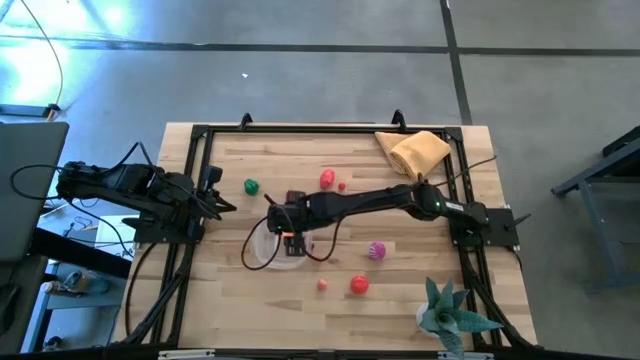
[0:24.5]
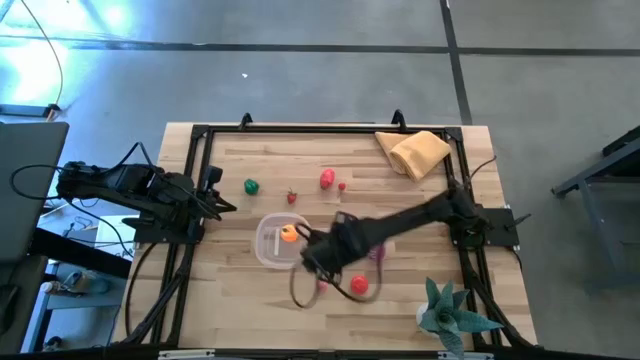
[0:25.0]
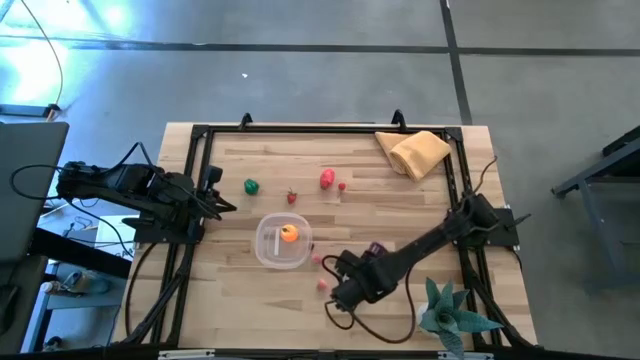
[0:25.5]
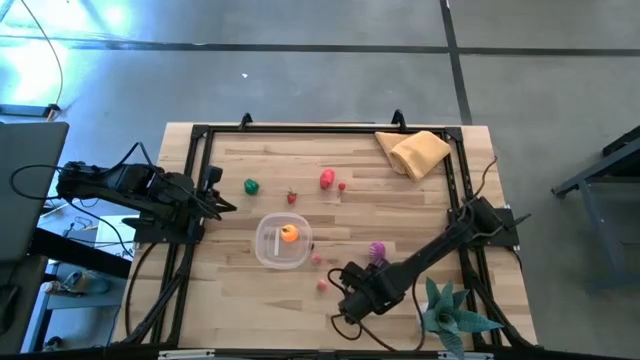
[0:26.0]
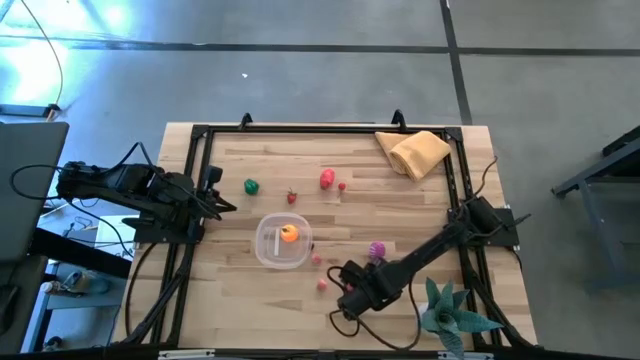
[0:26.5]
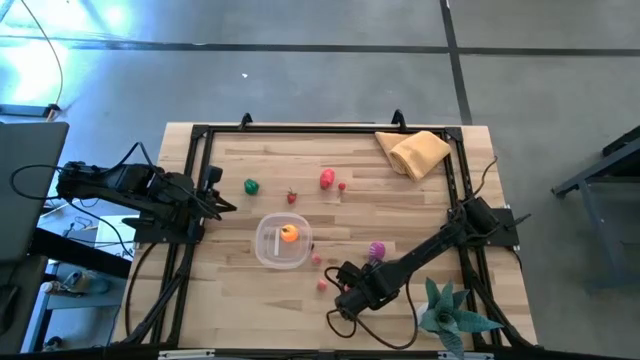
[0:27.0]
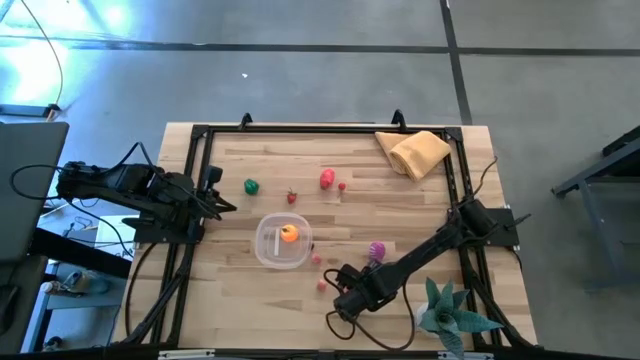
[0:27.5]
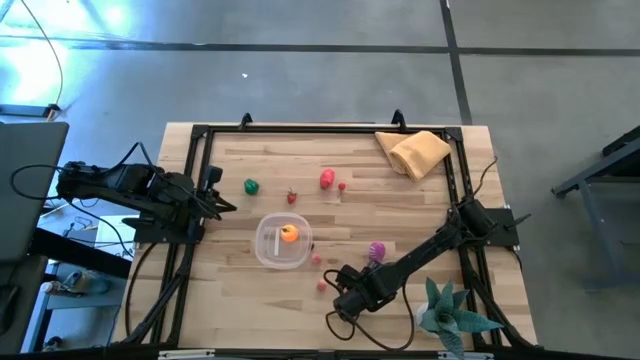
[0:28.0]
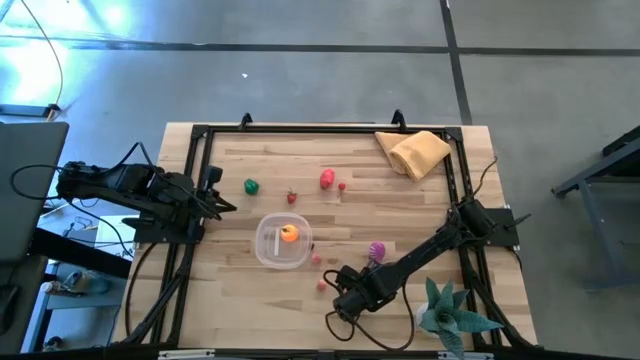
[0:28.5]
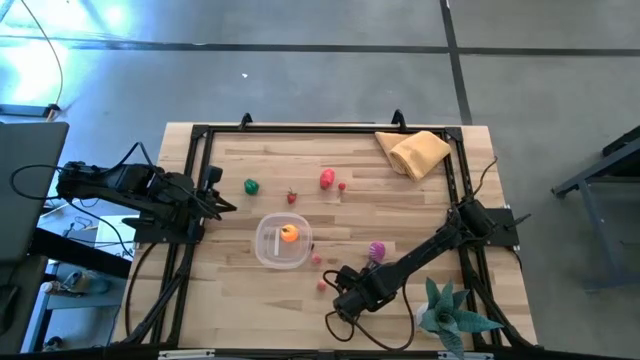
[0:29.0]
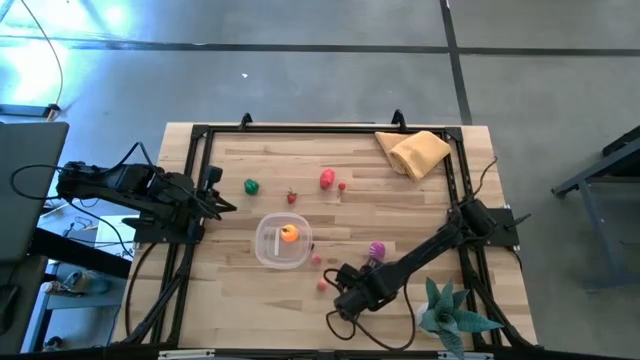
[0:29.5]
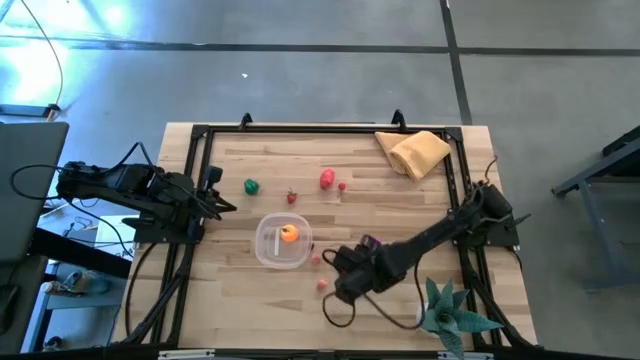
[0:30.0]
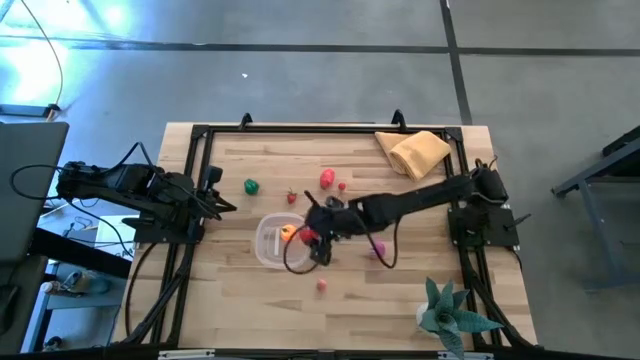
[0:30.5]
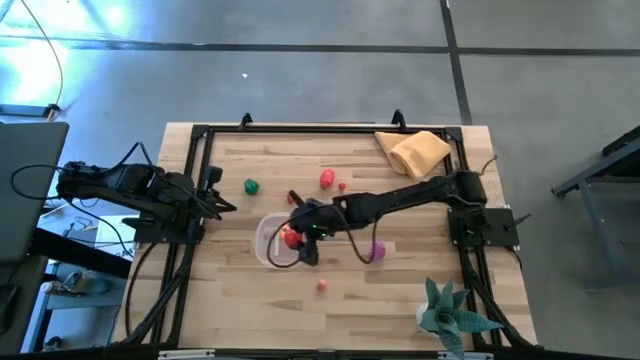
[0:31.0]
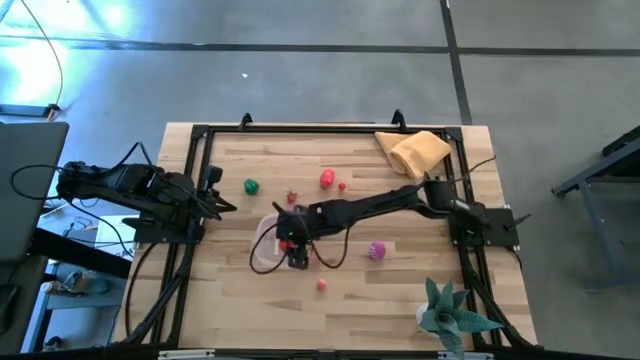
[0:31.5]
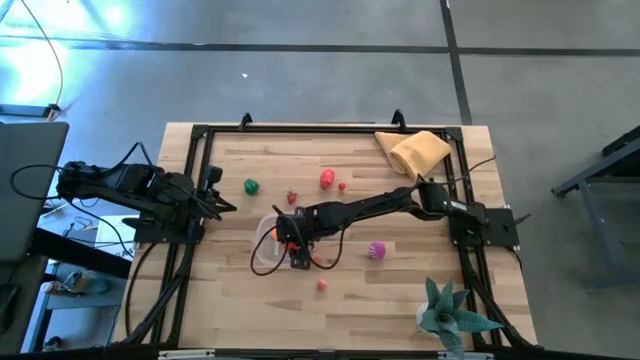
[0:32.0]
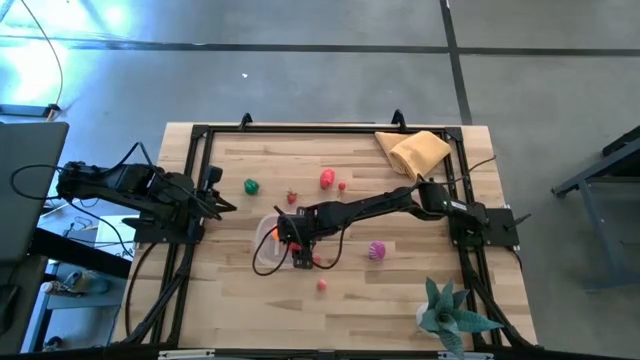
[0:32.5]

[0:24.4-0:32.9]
Task: Pick and placing Produce into tupperware
Put the tomato into the transparent container

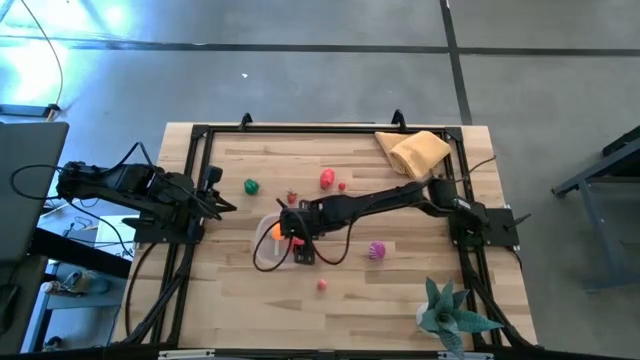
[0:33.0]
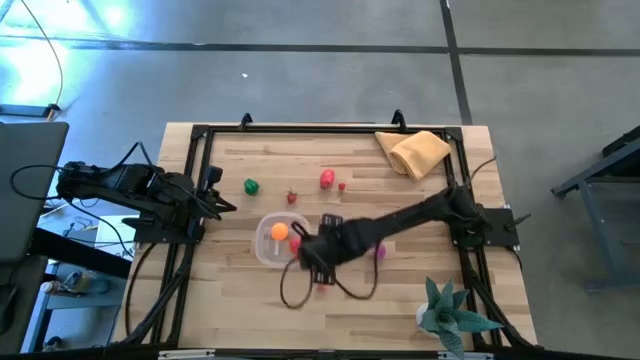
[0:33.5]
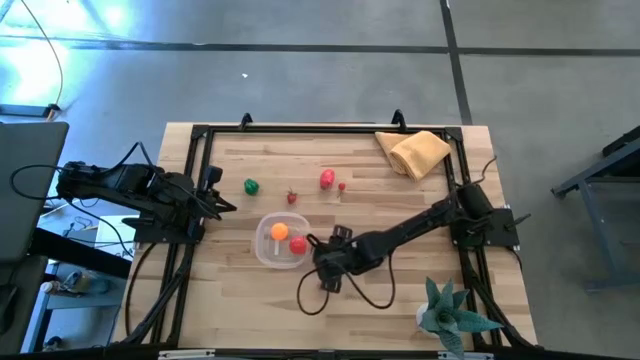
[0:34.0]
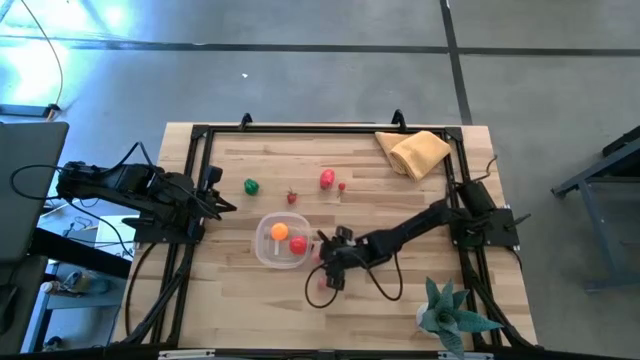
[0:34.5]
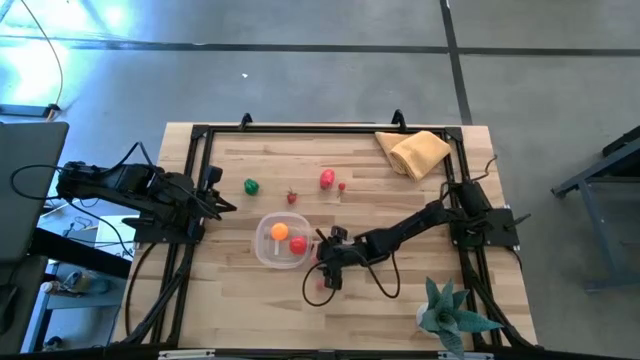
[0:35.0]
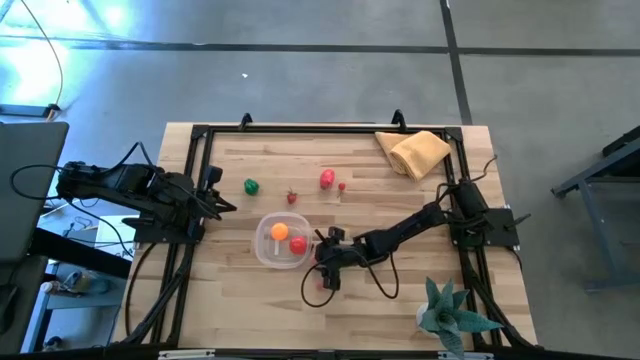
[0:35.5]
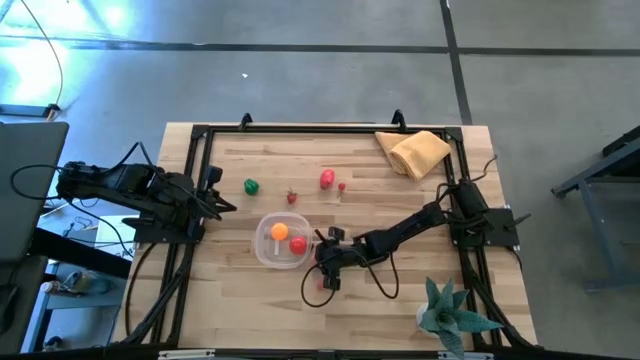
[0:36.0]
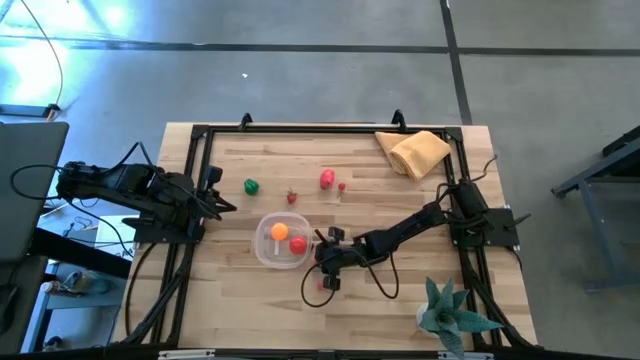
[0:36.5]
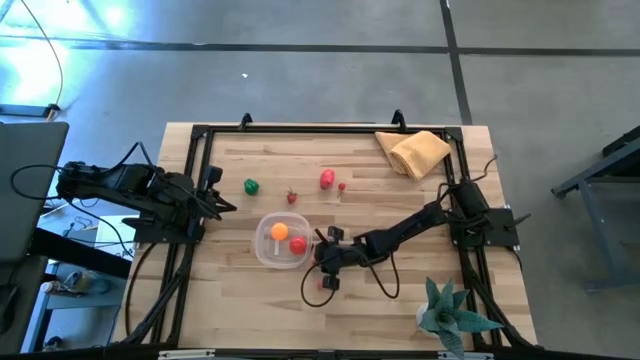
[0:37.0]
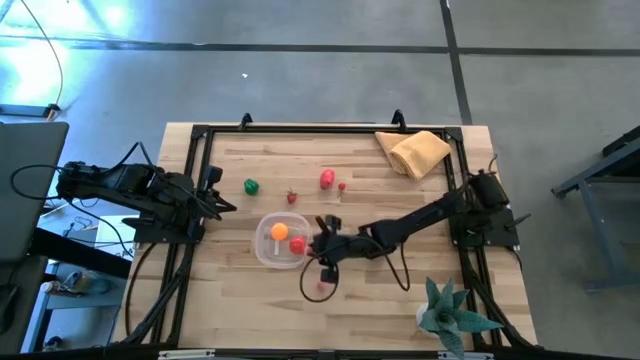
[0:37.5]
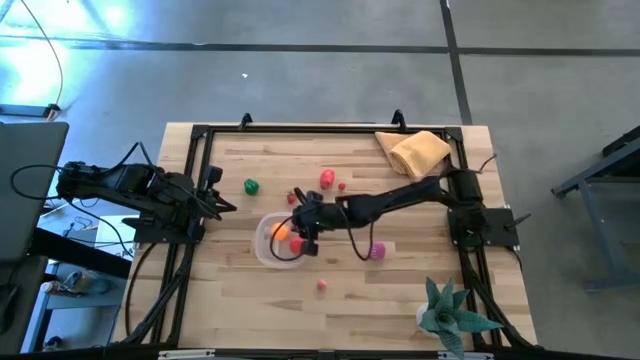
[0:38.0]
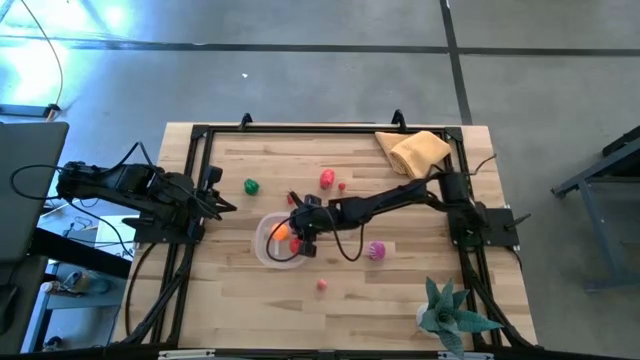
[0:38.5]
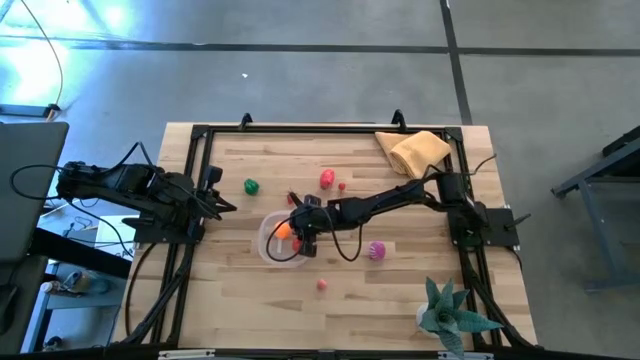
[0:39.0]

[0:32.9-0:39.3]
Put the top pink peach into the transparent container

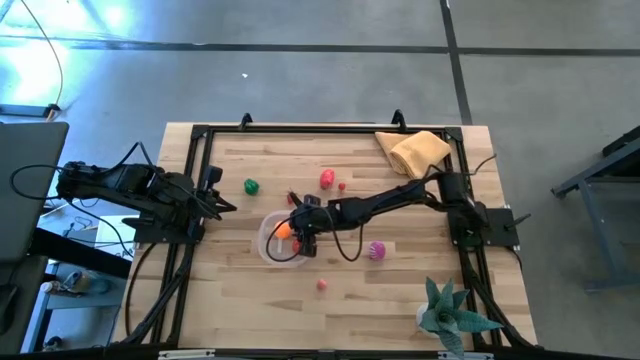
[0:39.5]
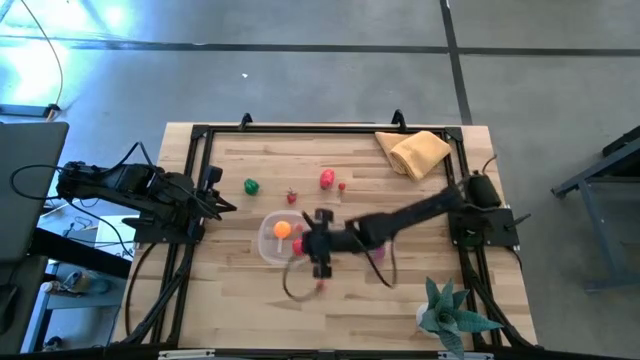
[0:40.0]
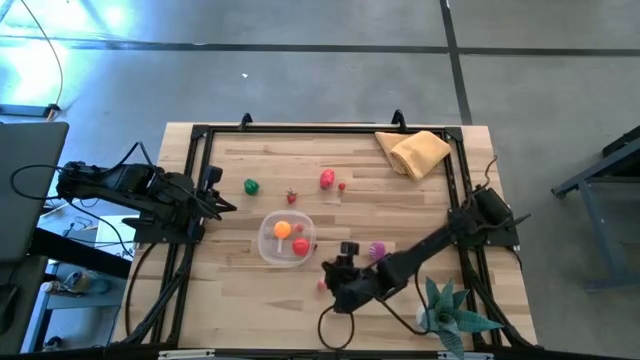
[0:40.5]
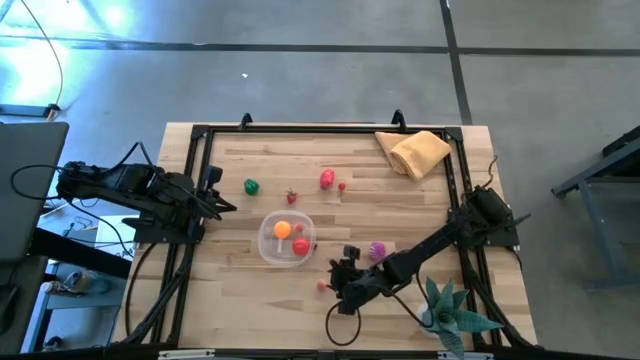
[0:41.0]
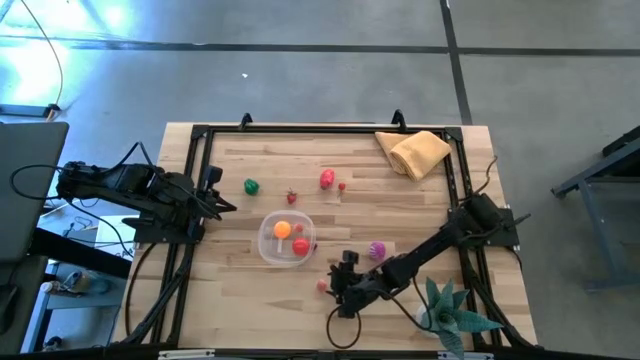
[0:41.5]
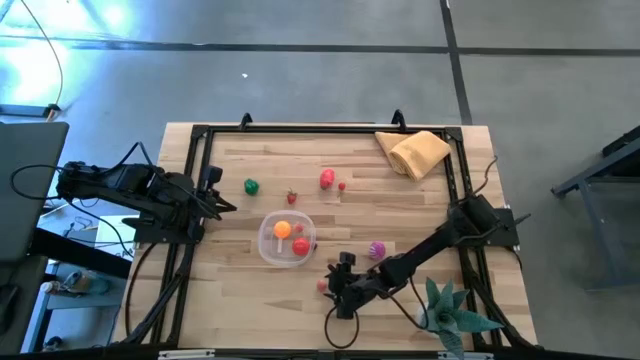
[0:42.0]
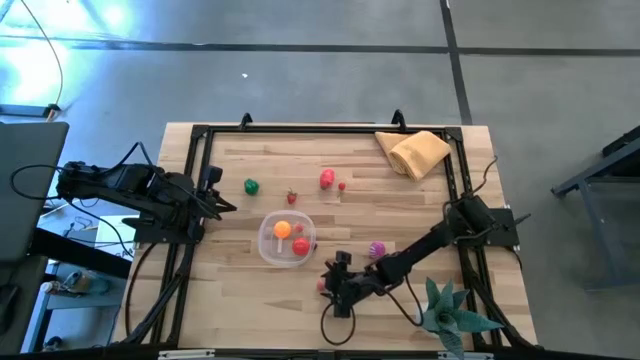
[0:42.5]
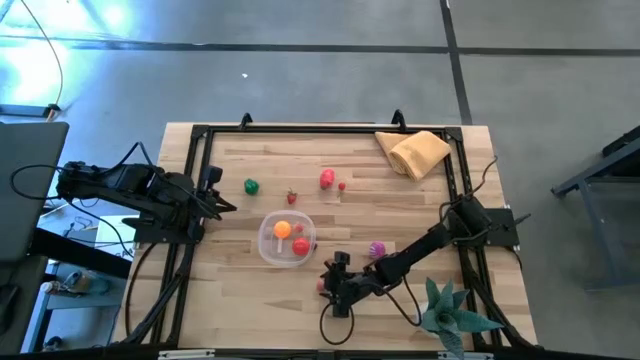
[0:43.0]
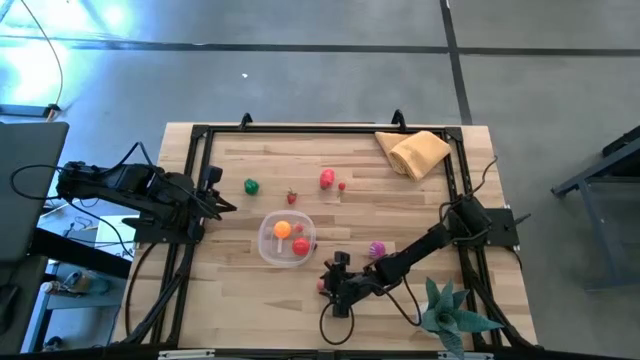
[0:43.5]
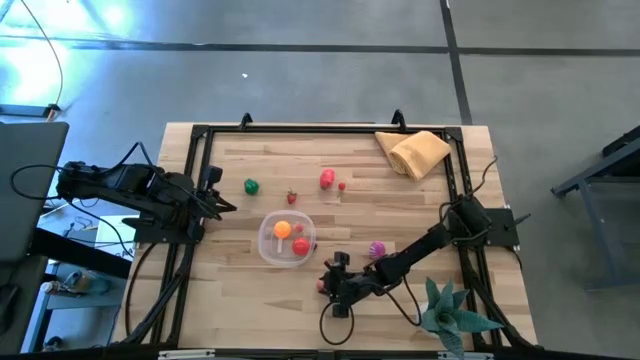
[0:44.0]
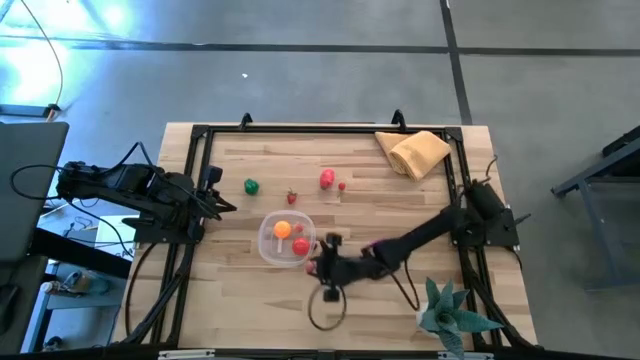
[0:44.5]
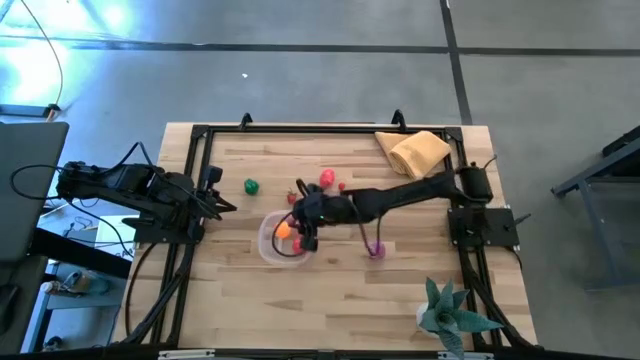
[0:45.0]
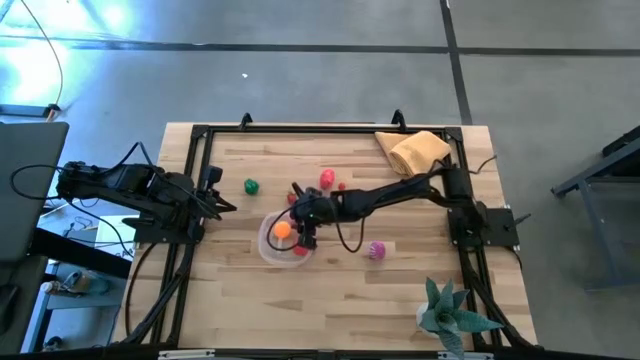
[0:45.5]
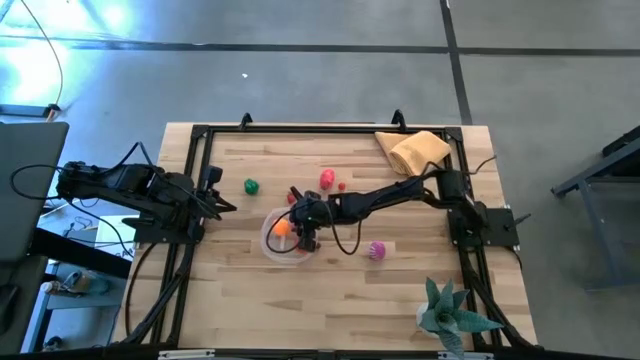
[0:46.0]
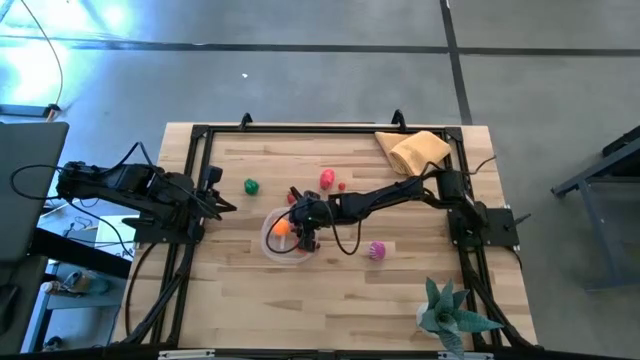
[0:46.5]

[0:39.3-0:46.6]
Put the pink peach into the transparent container
